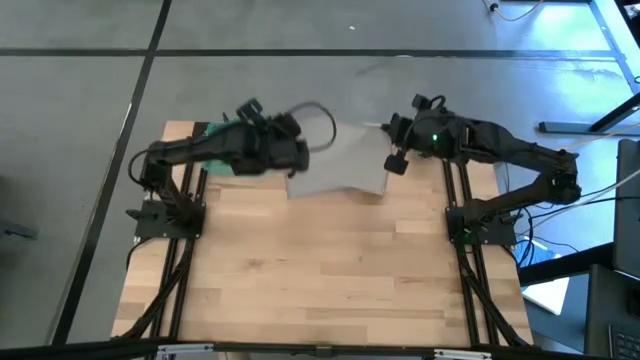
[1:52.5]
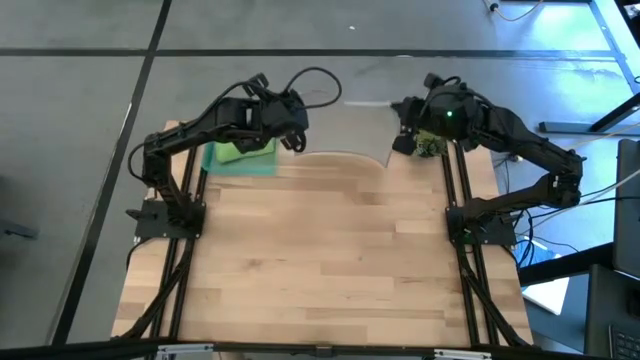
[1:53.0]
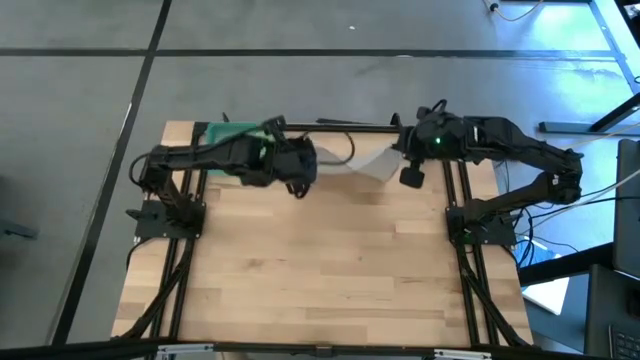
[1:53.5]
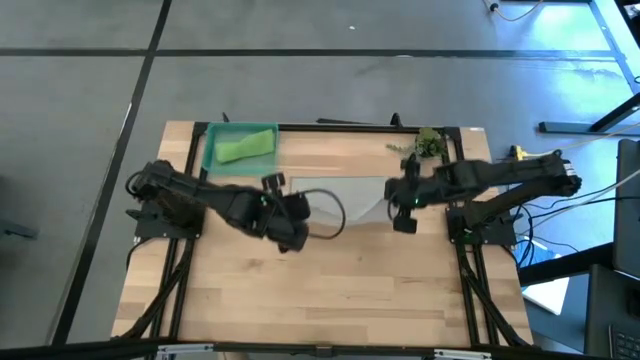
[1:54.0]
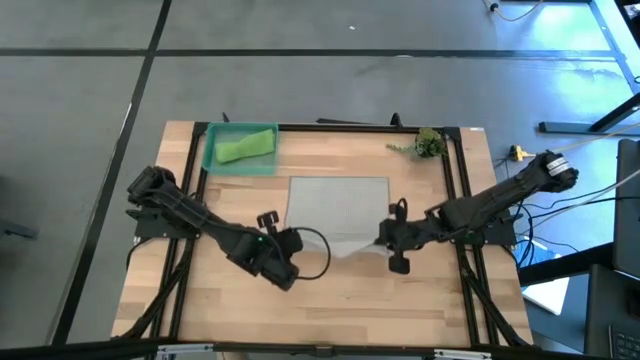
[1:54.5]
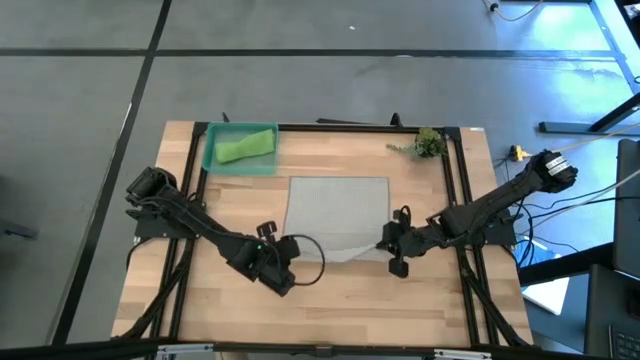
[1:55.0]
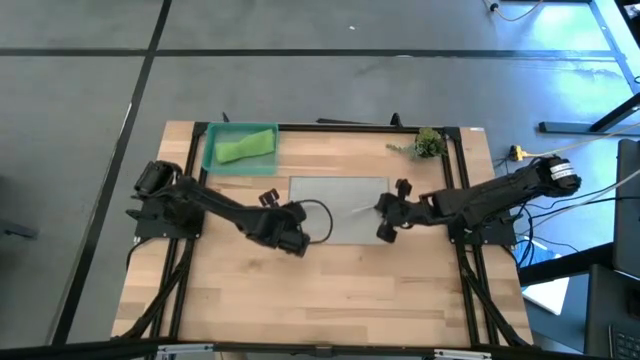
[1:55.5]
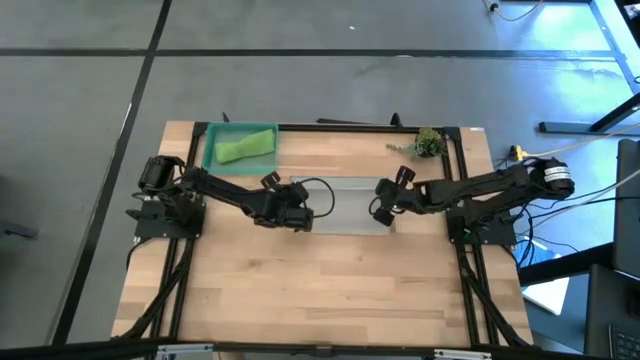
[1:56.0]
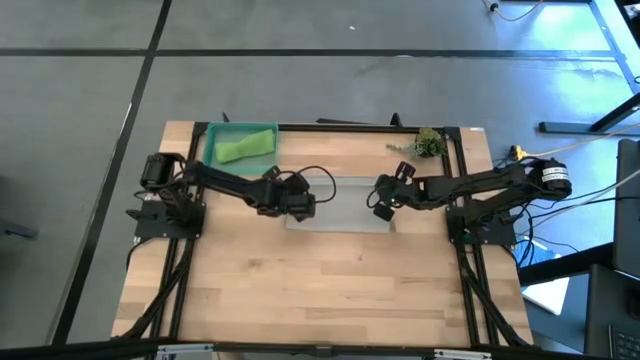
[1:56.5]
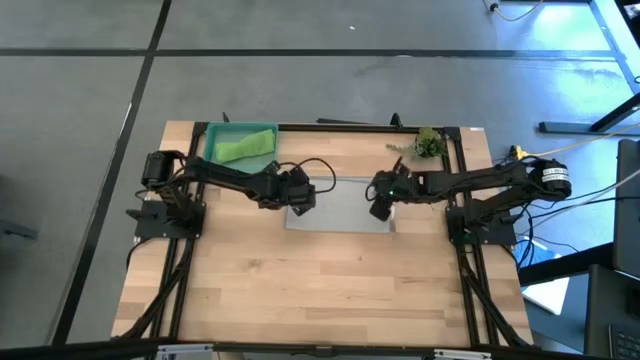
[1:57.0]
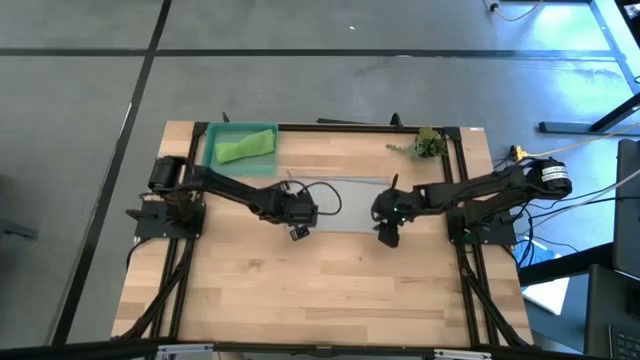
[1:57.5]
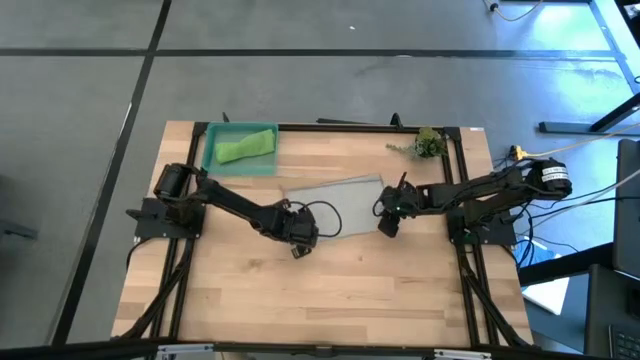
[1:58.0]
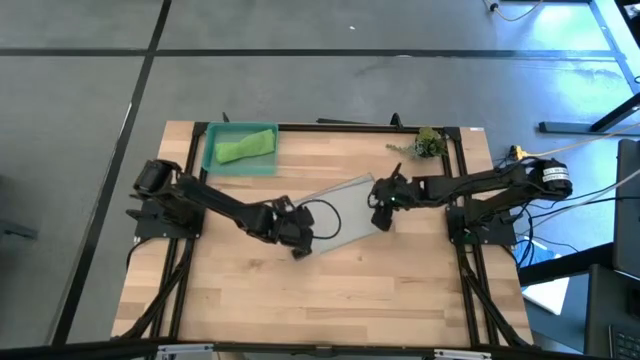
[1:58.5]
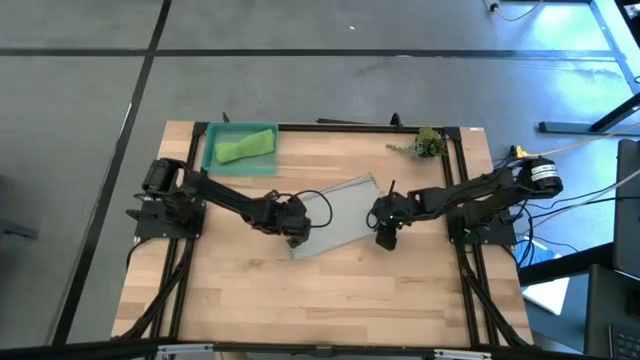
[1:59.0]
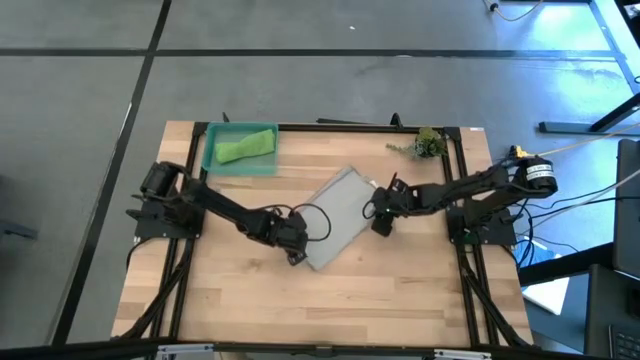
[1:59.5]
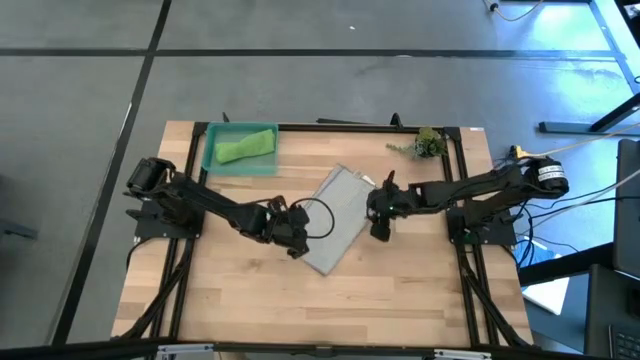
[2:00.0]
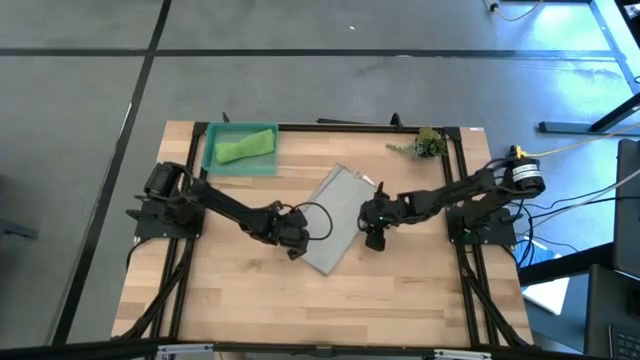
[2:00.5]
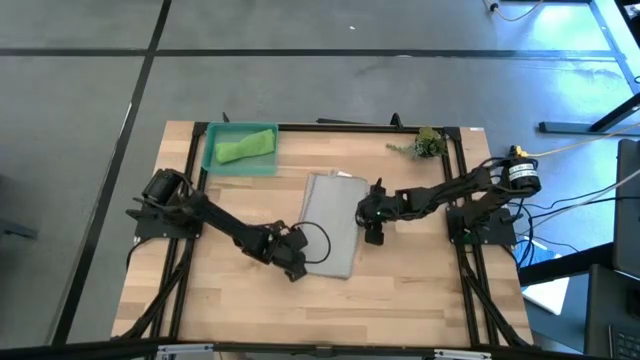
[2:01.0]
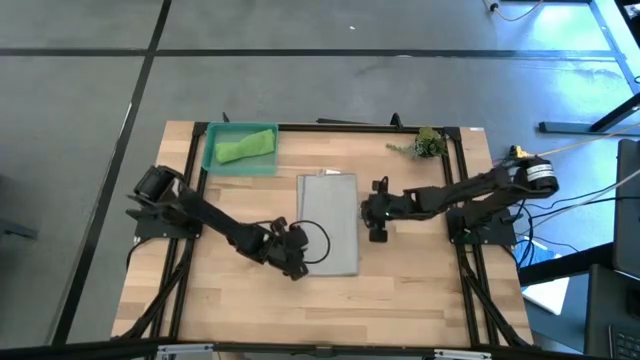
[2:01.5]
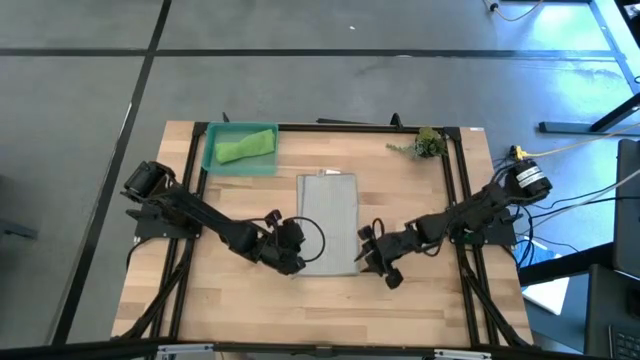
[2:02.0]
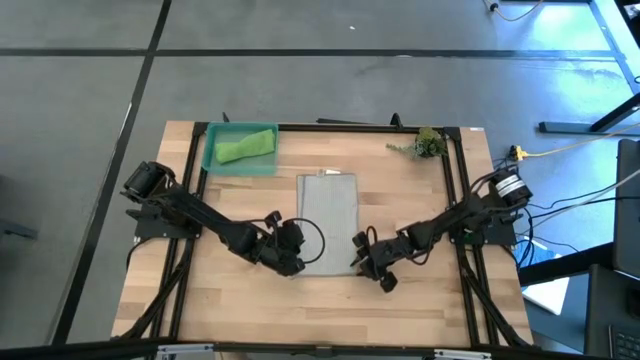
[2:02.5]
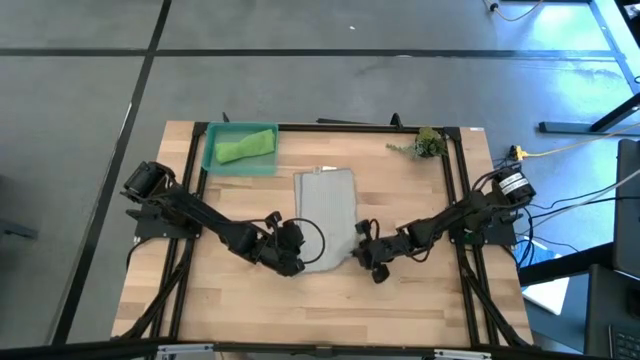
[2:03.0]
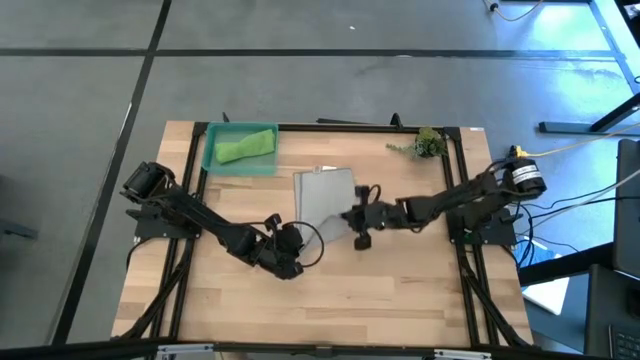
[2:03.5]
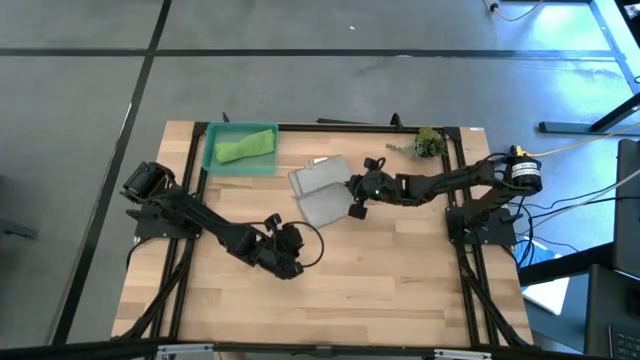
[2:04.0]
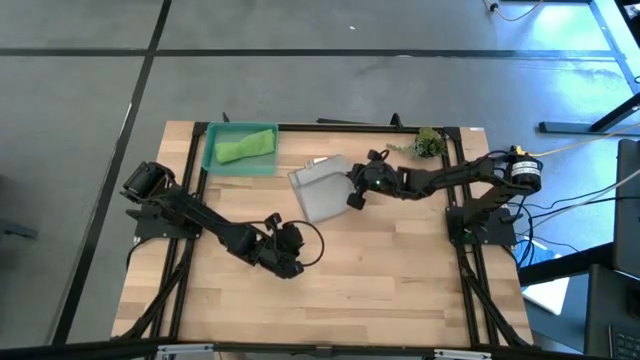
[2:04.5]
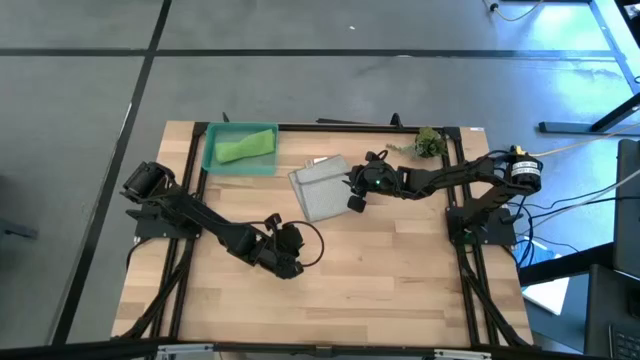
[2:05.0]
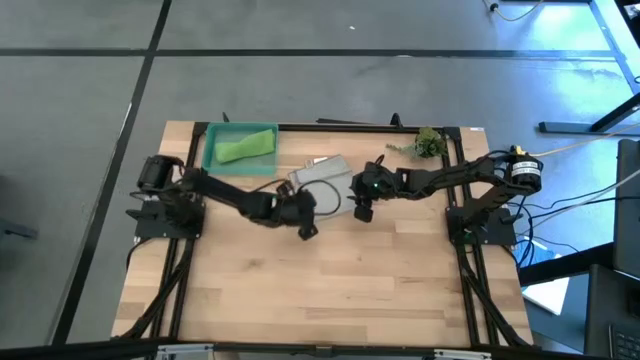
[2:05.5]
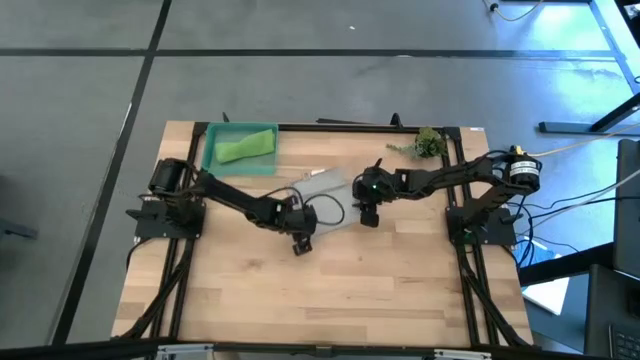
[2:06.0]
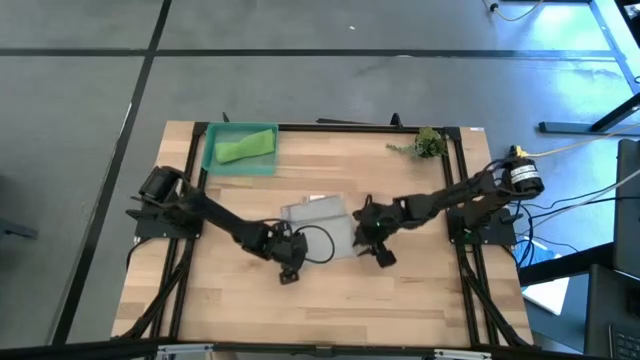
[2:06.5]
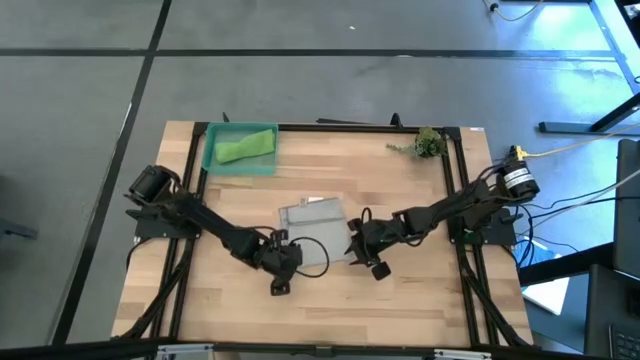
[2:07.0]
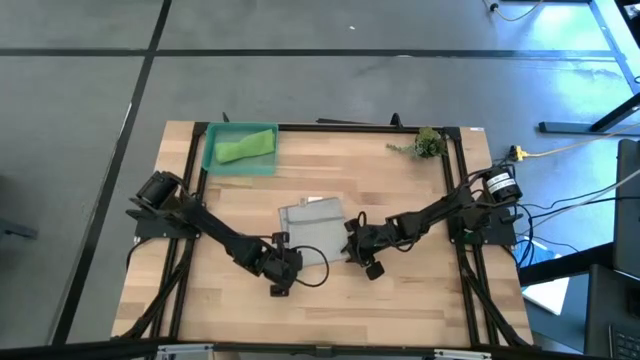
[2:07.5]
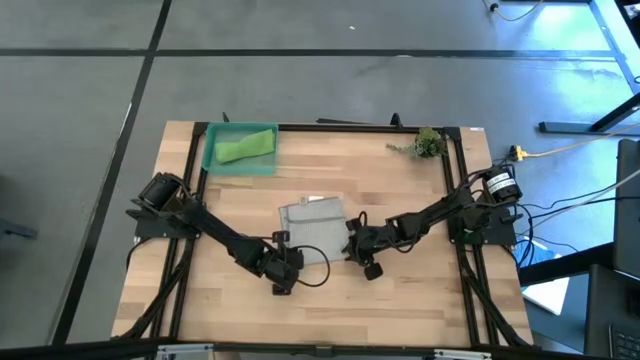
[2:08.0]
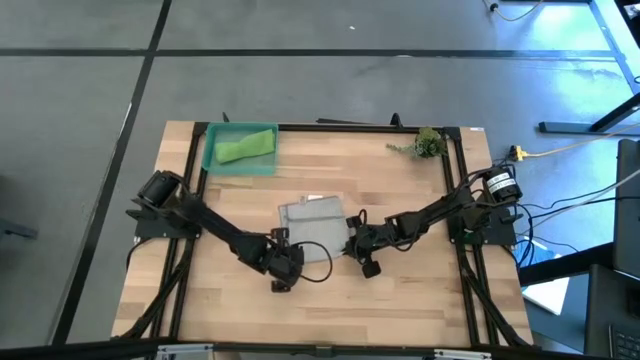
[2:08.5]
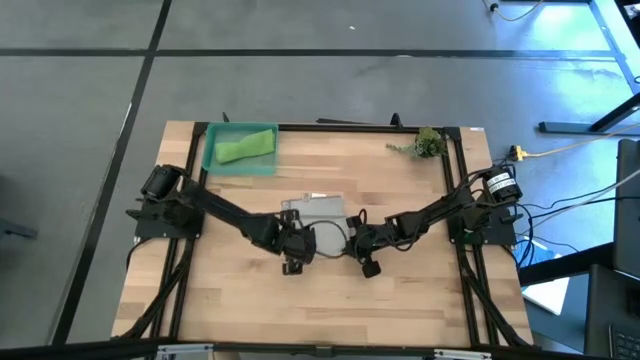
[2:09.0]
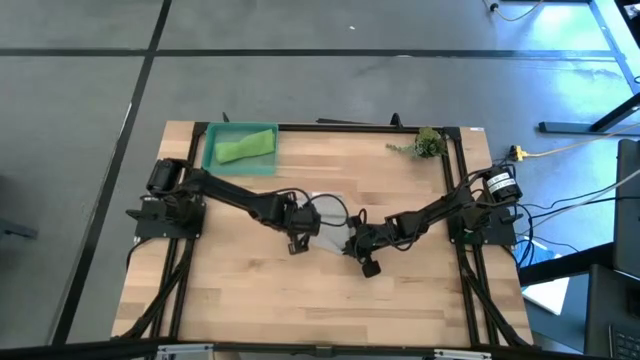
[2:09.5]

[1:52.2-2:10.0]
Task: Roll microfiber towels into tight, uniform cylinder then place into a basket
Roll the gray towel

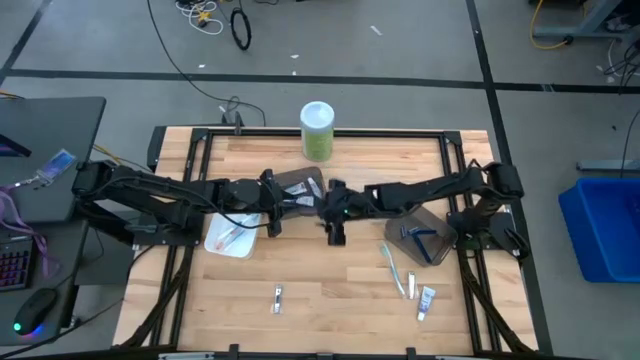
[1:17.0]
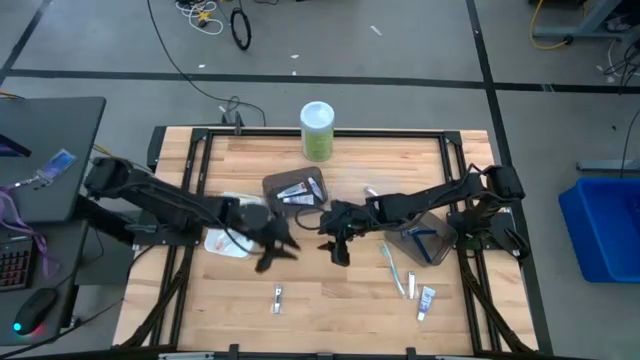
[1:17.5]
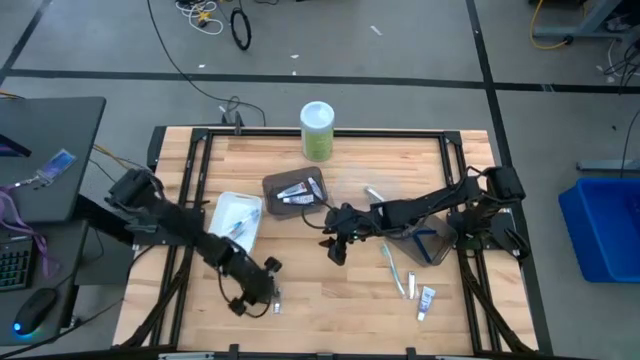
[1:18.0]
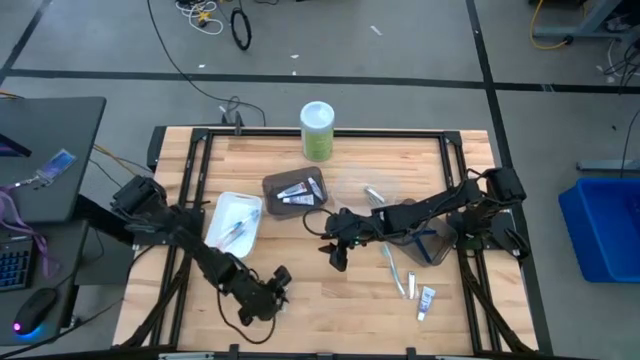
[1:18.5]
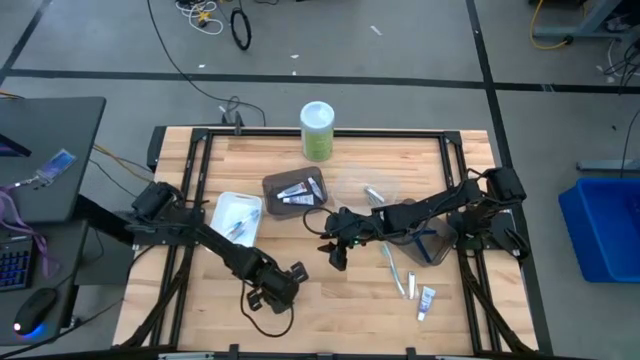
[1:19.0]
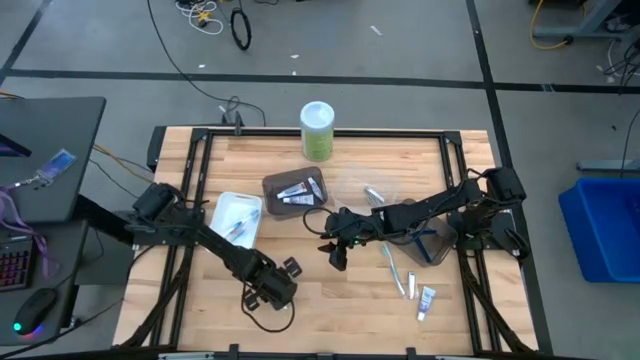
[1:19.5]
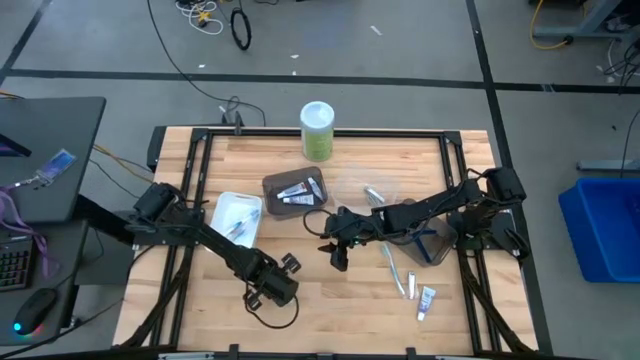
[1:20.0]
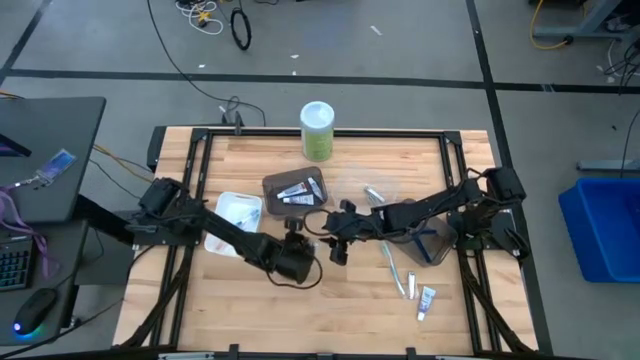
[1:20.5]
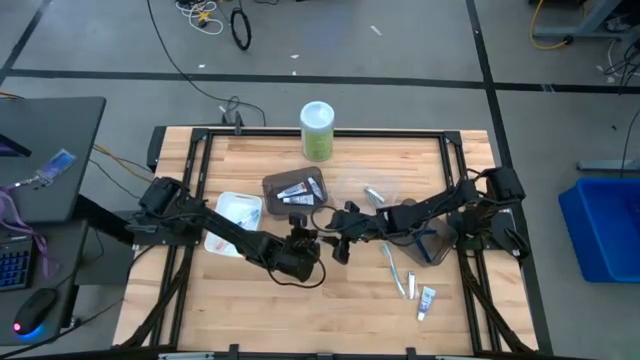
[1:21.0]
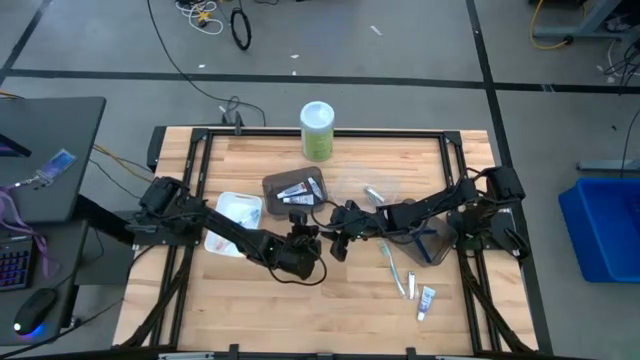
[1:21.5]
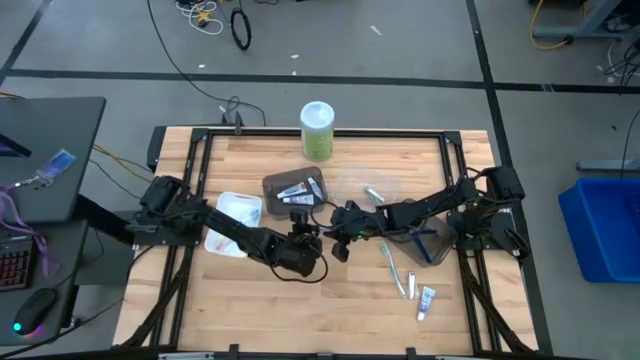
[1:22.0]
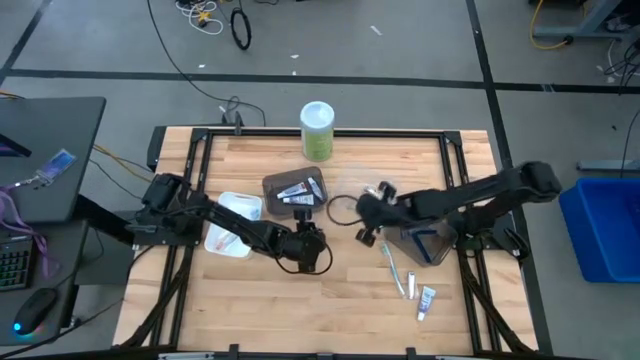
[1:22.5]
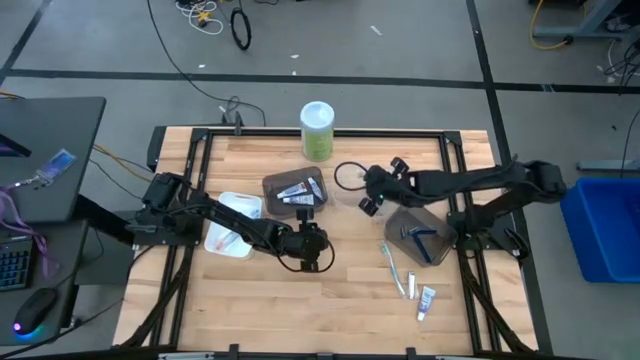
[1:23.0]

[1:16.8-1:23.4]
Task: Pick & Place Travel size toiletries
Put the nail cutter into the transparent bin
